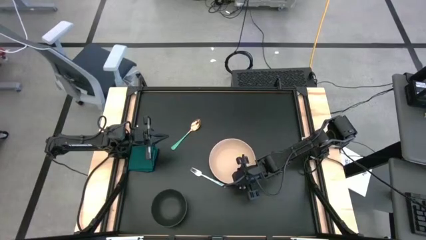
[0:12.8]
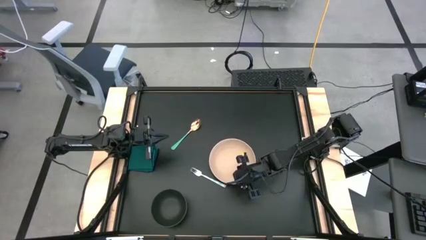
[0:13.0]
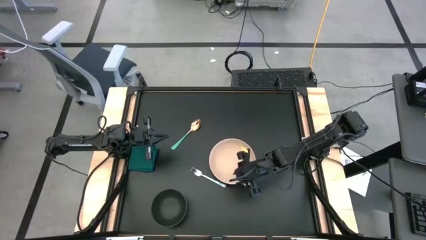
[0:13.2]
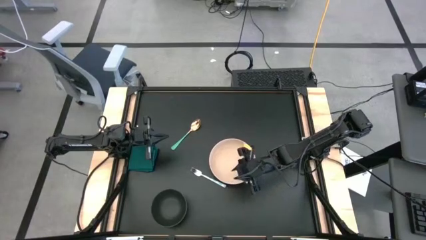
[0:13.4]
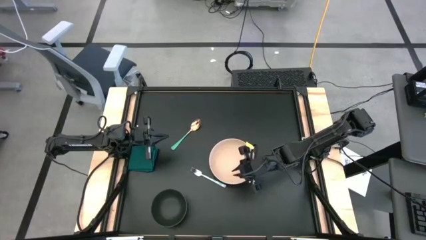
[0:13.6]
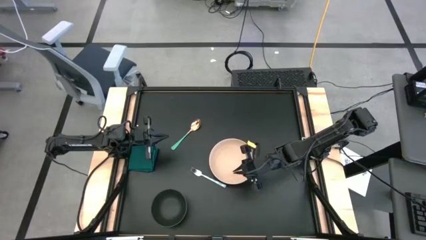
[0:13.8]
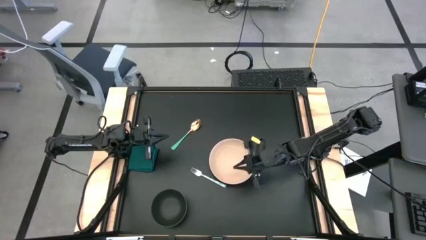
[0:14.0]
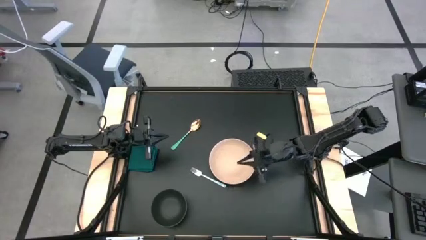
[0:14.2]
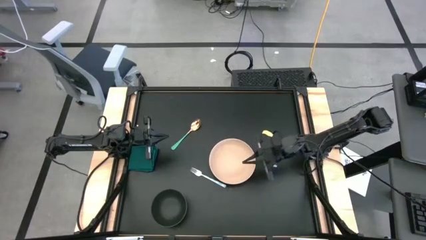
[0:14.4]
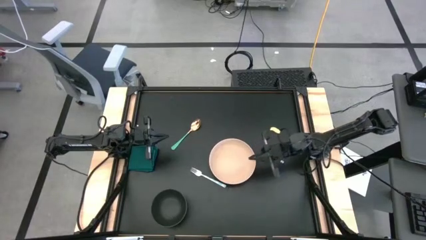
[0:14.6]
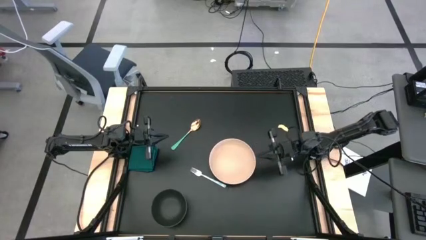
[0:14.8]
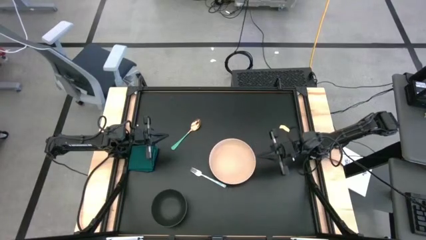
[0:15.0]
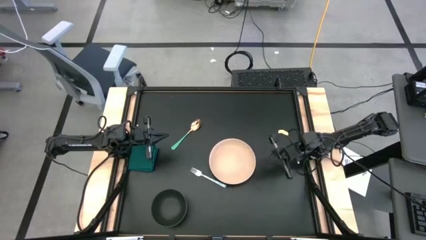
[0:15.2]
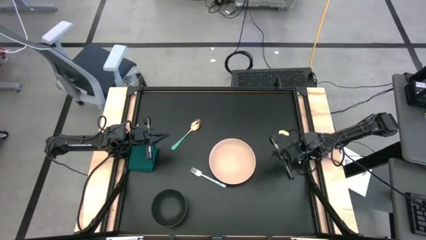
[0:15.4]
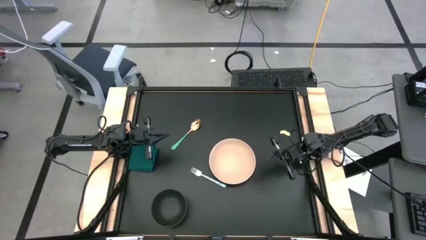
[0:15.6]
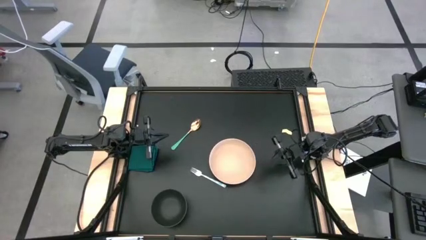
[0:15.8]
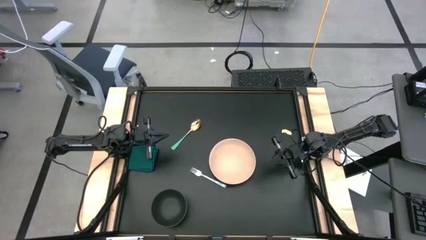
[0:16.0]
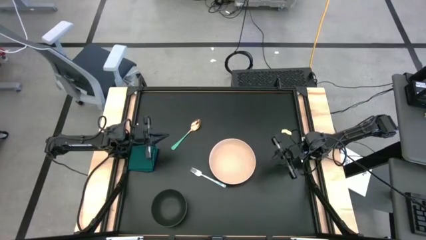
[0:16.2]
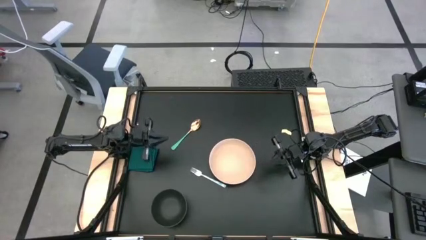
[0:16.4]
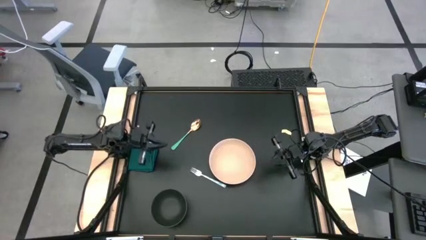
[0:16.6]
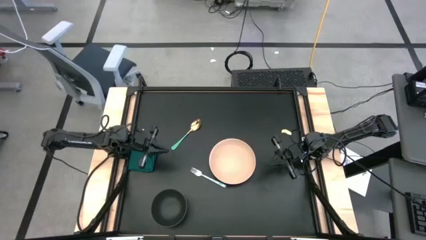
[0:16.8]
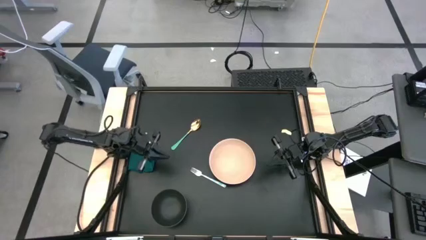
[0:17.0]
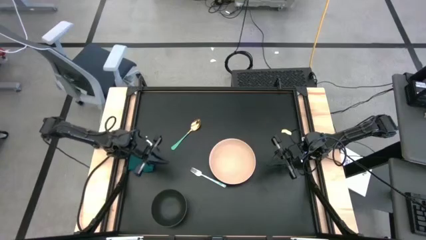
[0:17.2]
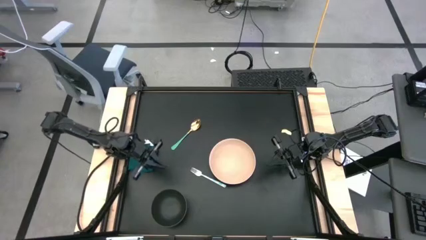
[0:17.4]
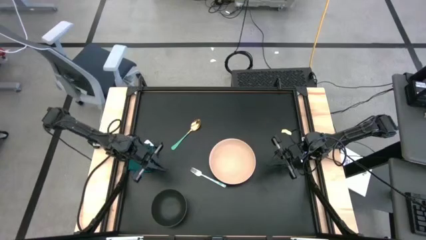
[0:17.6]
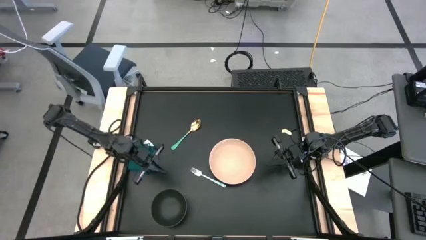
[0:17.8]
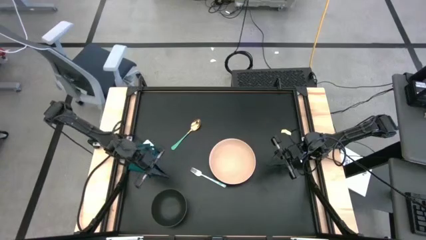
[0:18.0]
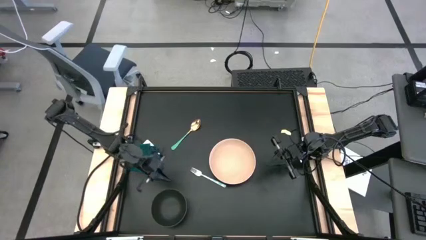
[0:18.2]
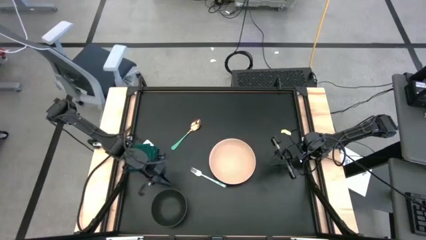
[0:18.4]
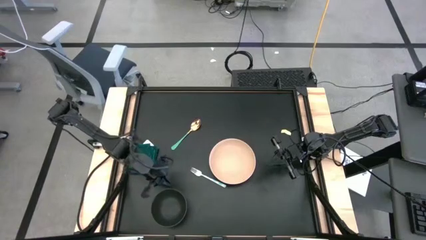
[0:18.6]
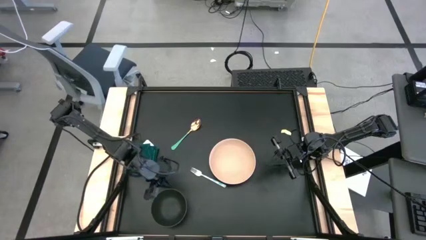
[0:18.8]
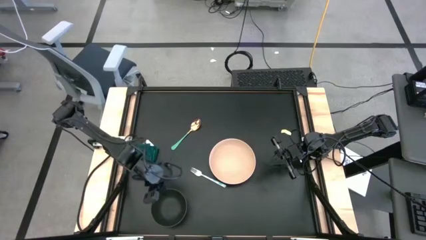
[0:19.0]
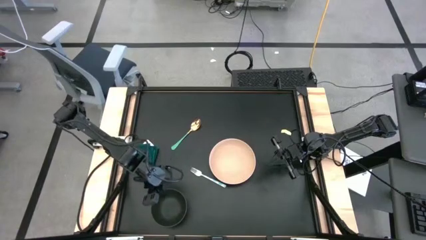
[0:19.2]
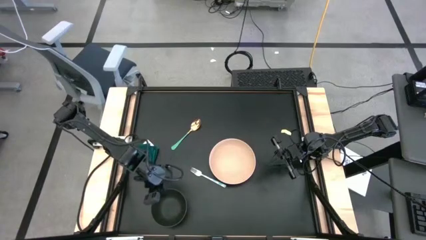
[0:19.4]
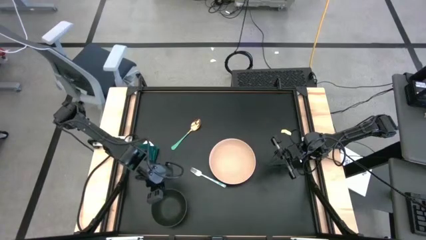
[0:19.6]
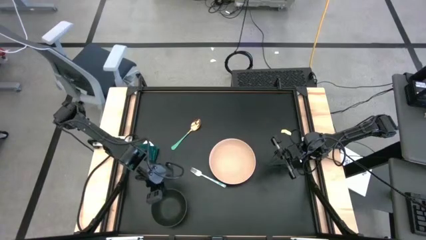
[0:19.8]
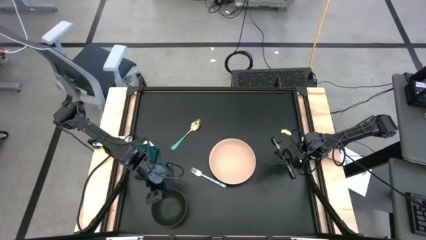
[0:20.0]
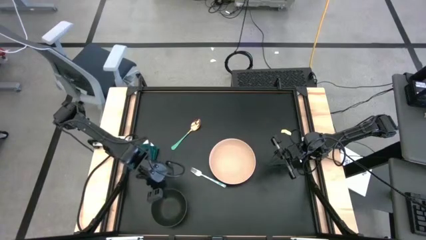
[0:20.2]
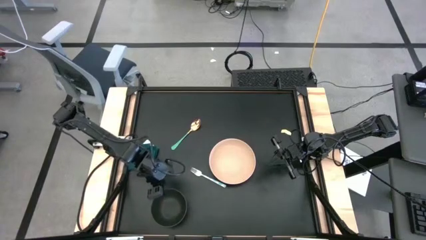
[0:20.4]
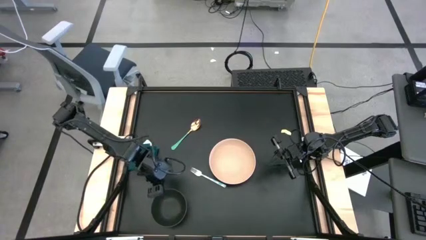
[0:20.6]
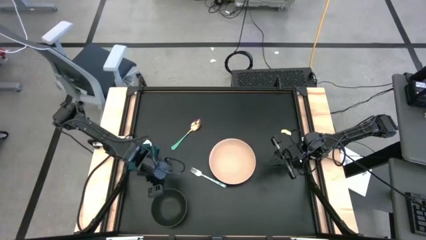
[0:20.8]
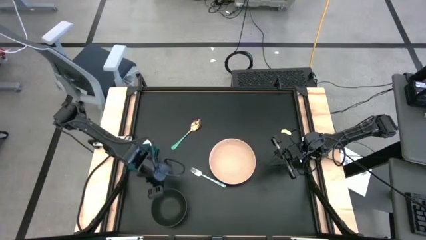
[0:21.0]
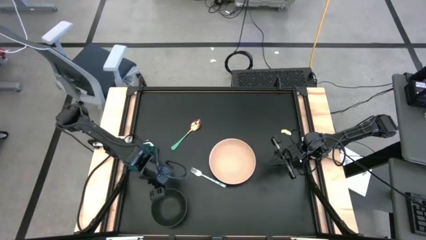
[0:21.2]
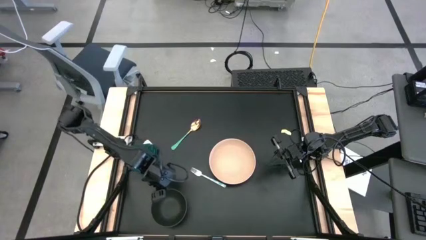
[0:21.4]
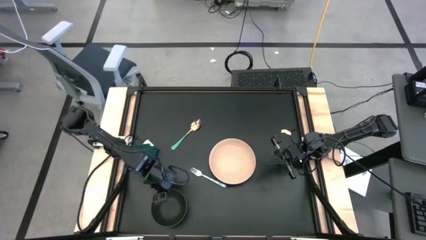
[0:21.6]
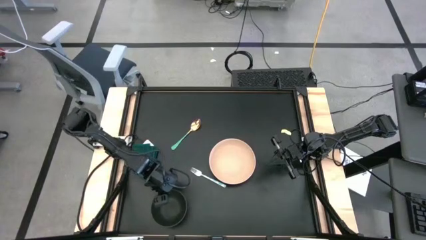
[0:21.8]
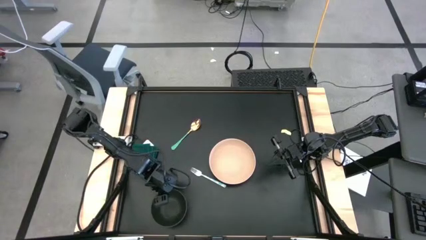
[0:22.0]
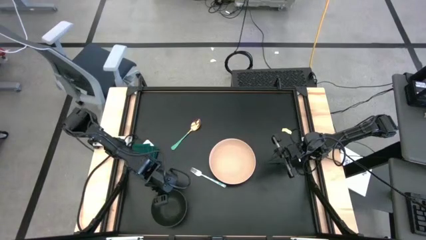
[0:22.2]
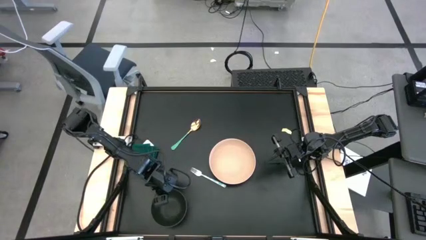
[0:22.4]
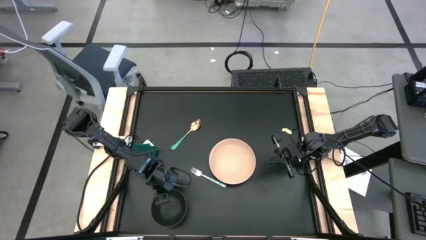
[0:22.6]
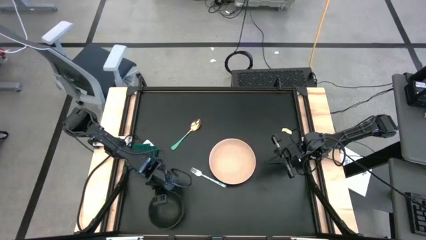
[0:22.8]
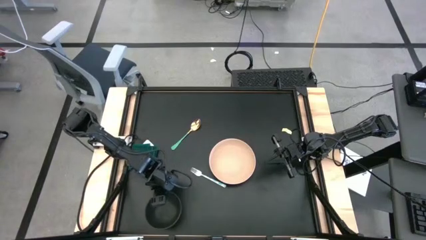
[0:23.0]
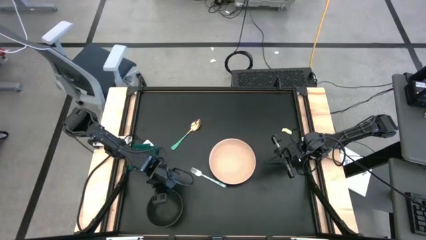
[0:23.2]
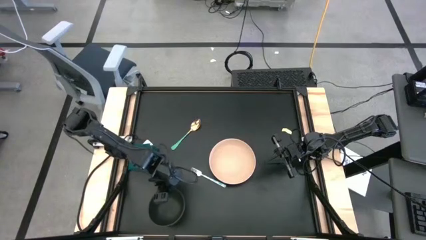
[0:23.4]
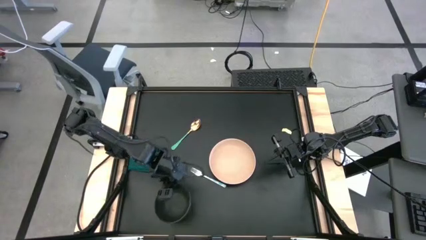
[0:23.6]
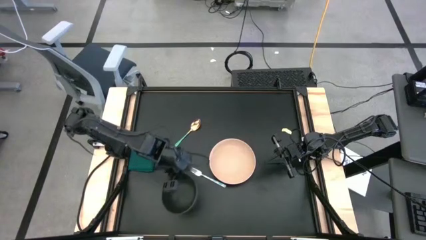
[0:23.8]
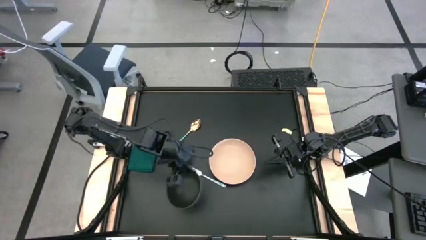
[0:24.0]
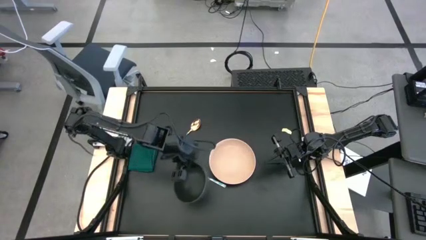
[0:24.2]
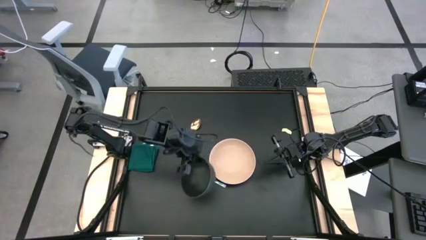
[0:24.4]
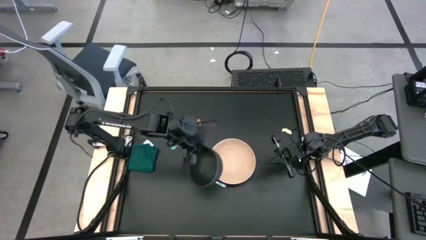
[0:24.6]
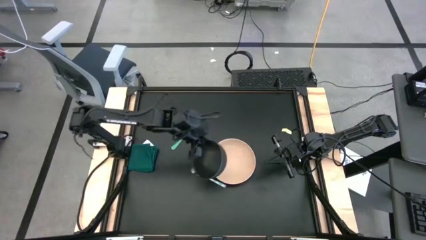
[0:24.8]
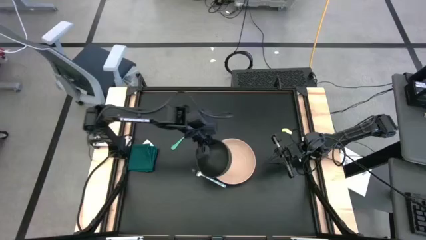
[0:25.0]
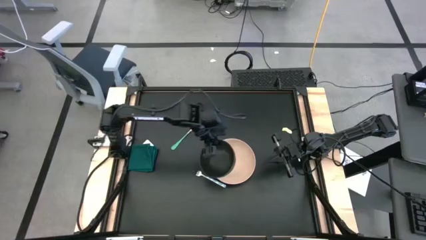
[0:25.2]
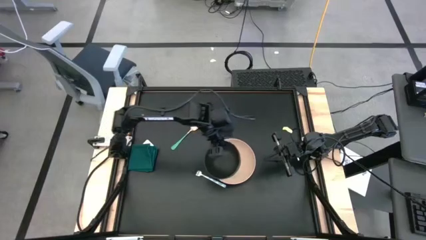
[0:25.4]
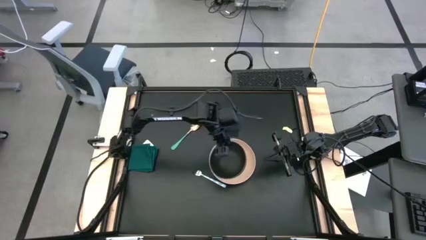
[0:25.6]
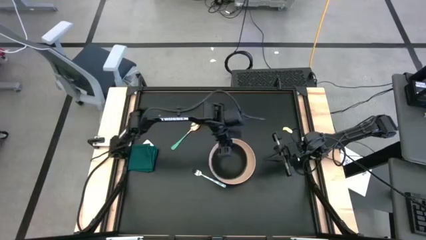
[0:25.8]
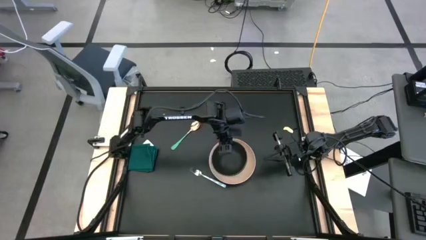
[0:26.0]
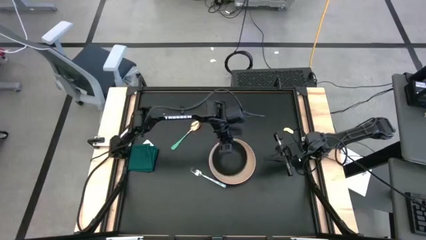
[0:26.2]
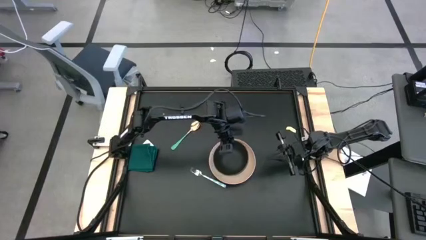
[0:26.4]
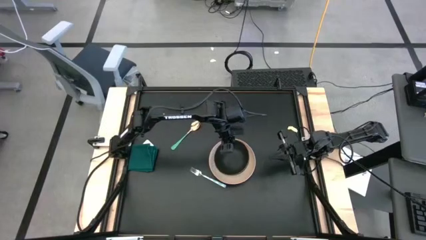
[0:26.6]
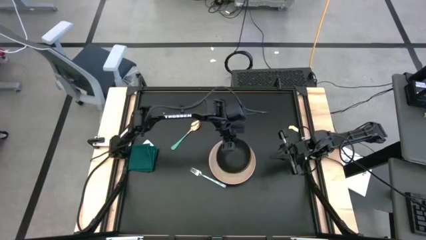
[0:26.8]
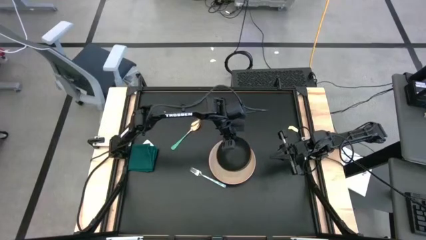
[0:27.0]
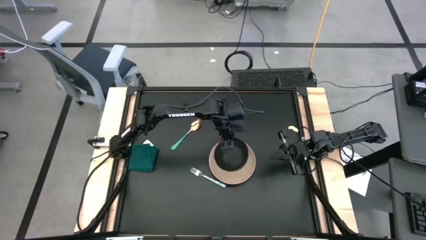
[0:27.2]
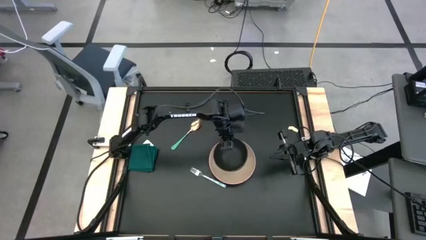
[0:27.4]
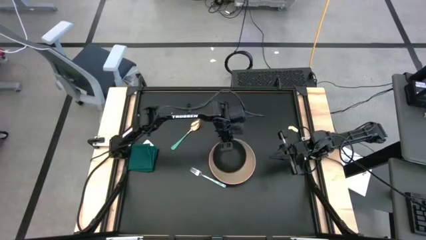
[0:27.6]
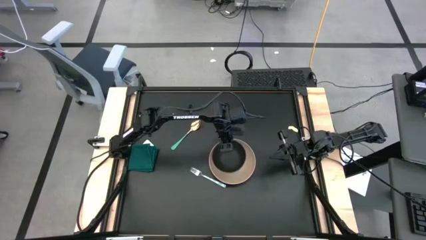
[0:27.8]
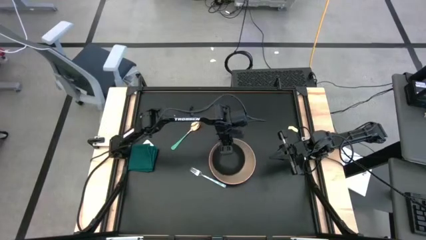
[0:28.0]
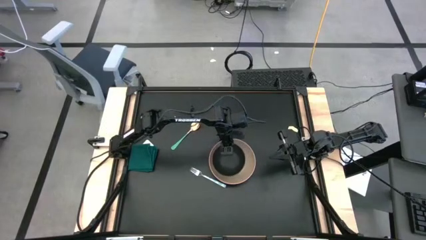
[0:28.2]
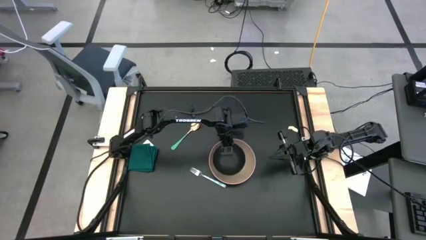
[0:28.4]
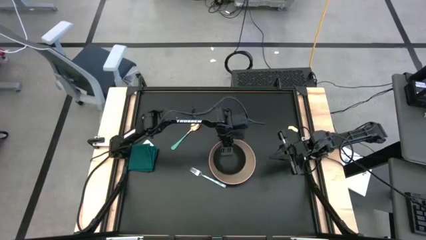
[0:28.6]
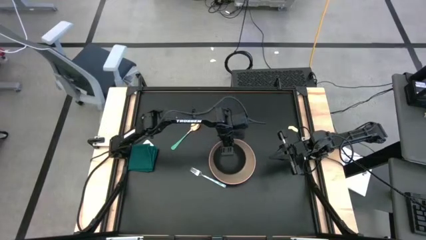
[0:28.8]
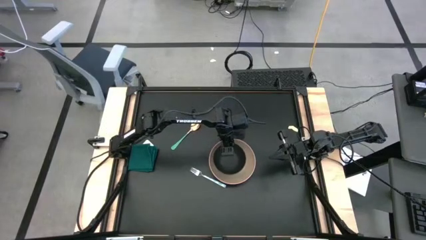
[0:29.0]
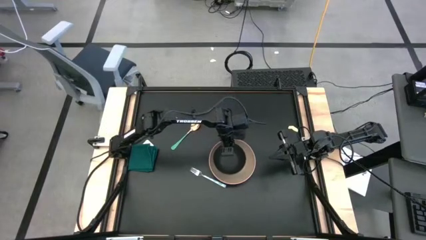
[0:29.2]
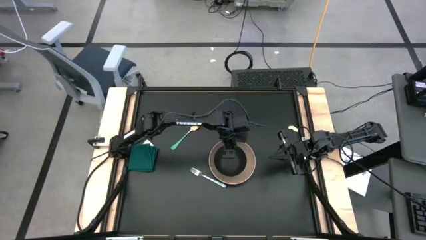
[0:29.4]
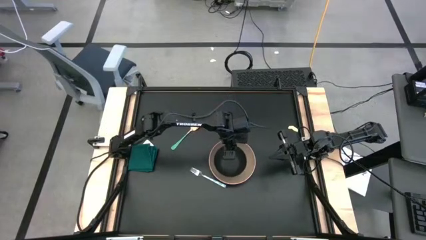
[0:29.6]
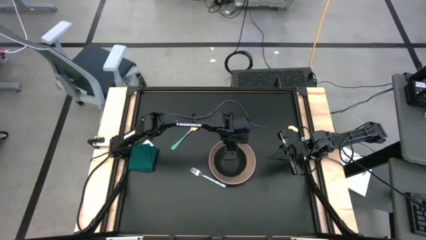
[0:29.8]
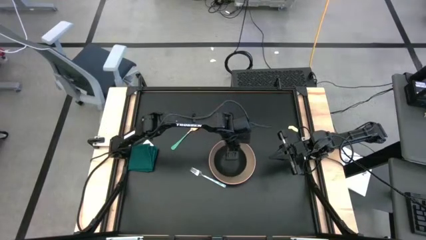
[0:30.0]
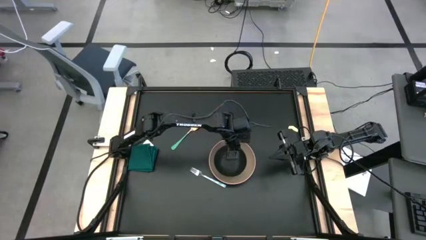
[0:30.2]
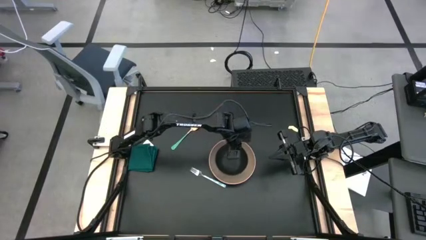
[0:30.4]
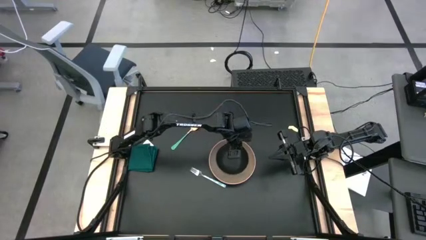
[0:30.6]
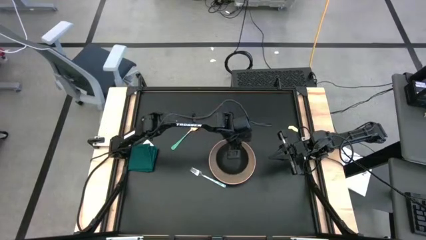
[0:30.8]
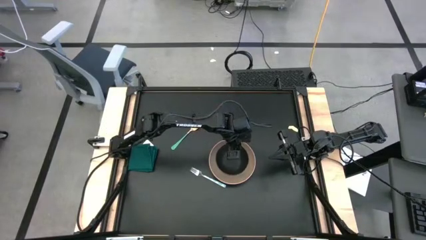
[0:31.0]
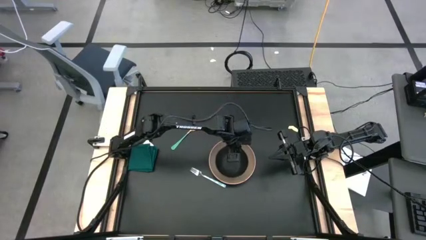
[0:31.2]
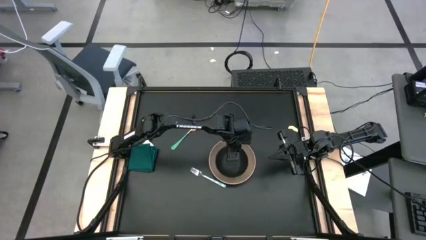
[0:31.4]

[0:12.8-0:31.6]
Task: Set table place
Put the black bowl on top of the brown plate
